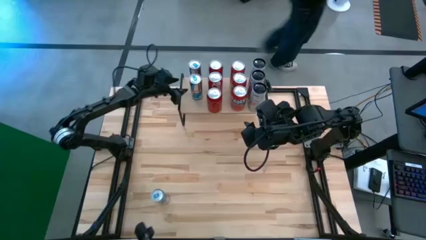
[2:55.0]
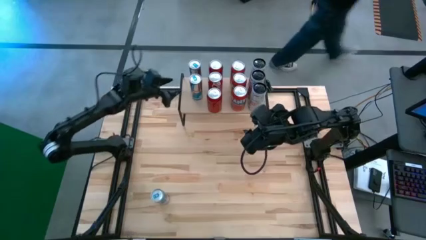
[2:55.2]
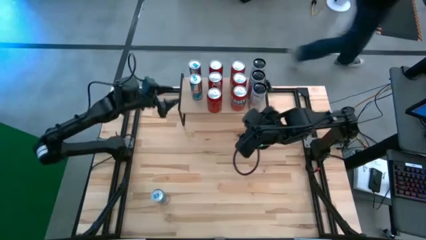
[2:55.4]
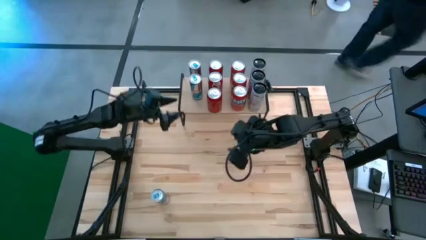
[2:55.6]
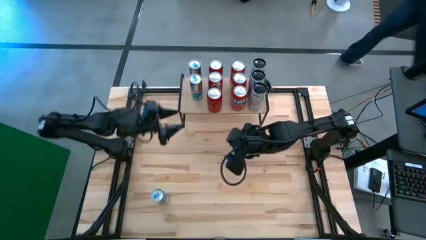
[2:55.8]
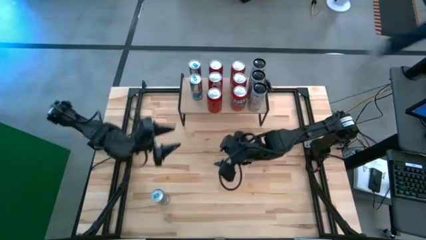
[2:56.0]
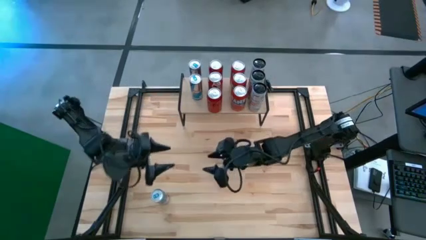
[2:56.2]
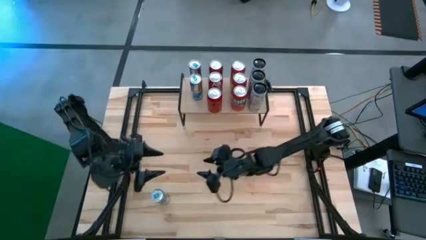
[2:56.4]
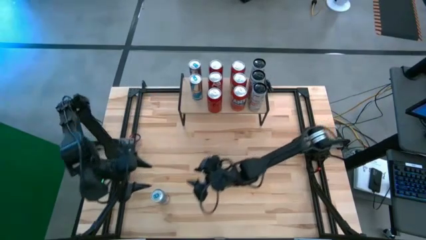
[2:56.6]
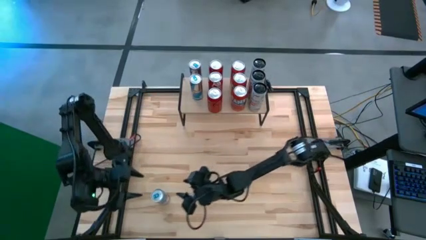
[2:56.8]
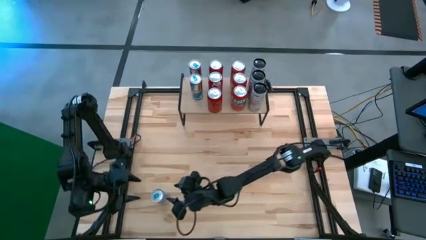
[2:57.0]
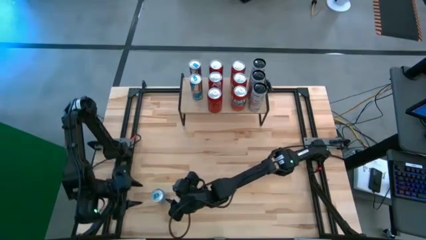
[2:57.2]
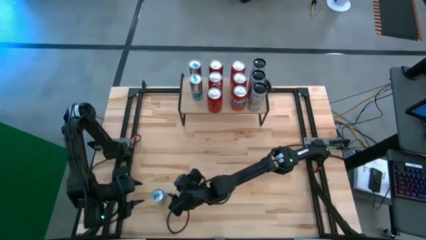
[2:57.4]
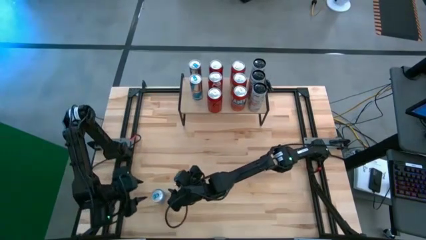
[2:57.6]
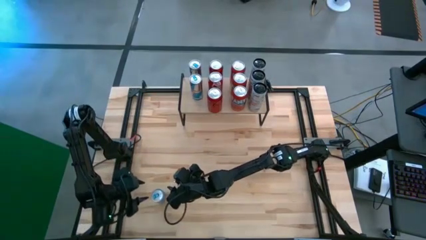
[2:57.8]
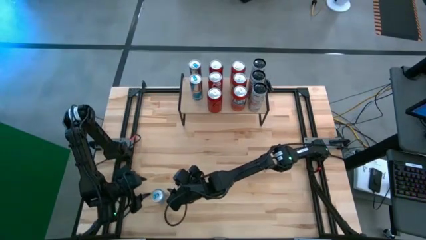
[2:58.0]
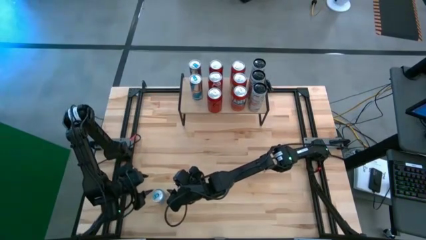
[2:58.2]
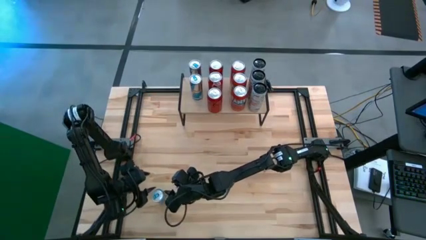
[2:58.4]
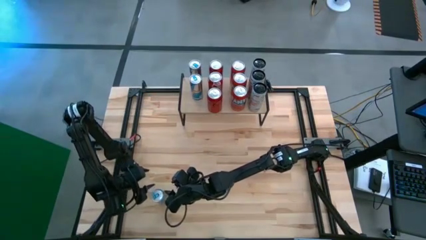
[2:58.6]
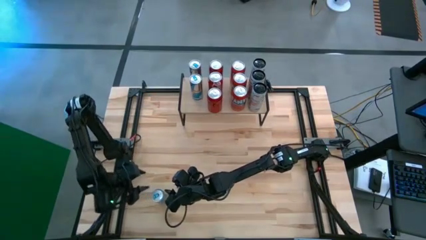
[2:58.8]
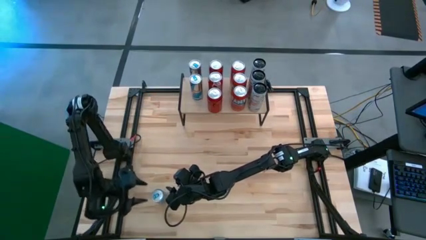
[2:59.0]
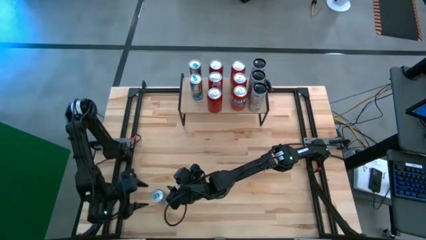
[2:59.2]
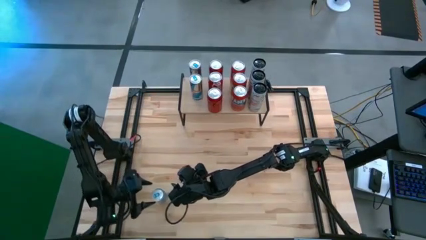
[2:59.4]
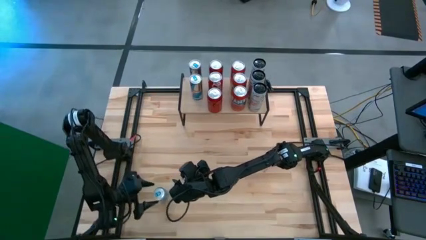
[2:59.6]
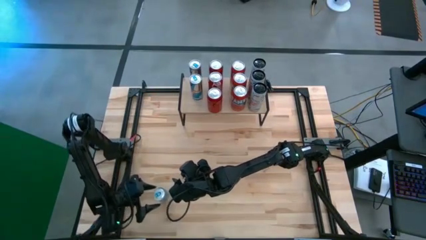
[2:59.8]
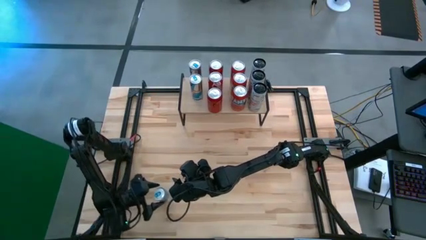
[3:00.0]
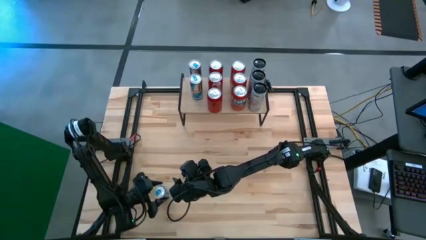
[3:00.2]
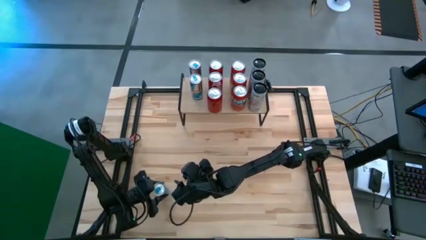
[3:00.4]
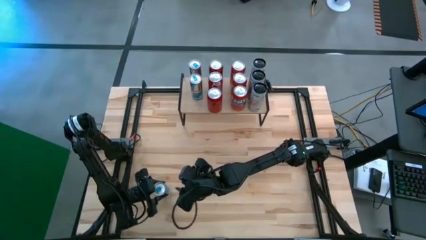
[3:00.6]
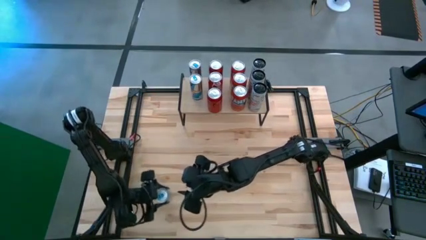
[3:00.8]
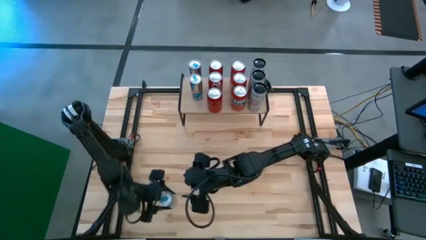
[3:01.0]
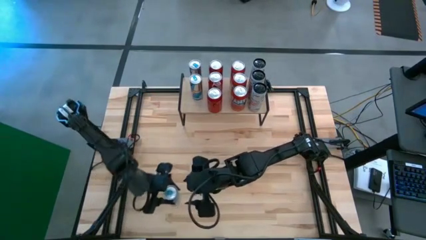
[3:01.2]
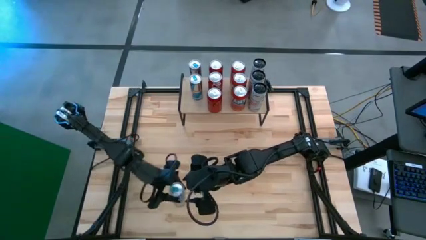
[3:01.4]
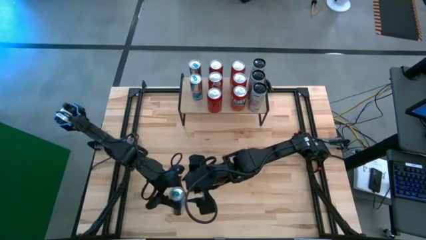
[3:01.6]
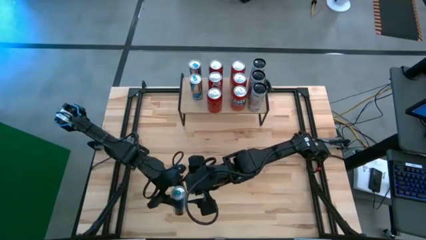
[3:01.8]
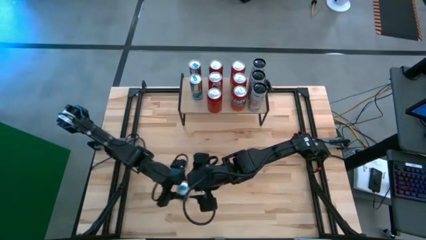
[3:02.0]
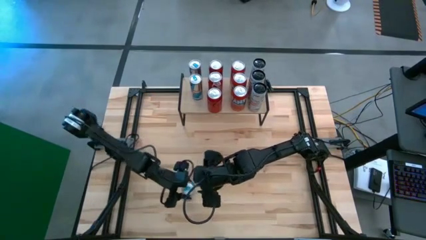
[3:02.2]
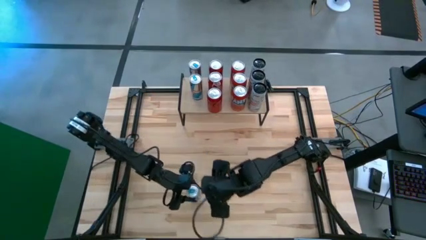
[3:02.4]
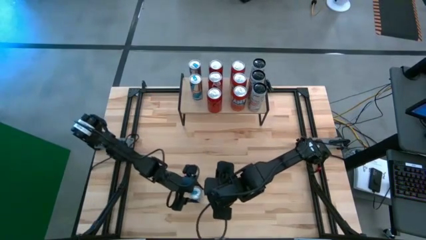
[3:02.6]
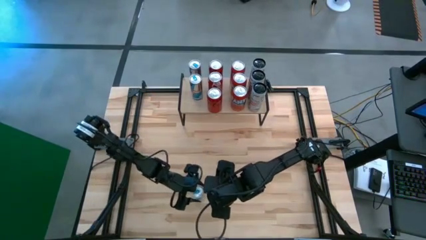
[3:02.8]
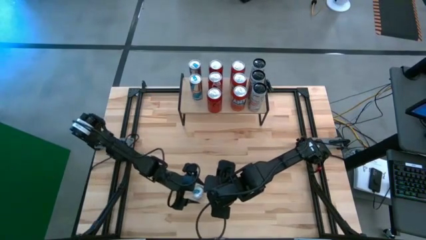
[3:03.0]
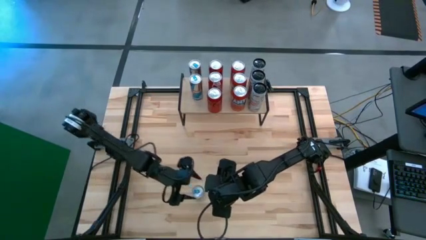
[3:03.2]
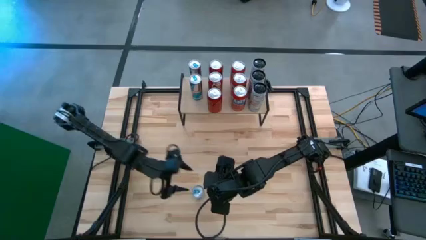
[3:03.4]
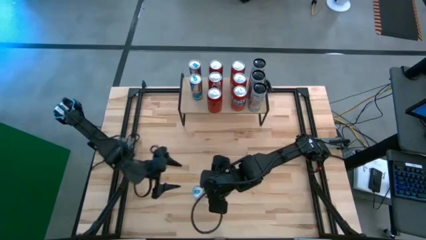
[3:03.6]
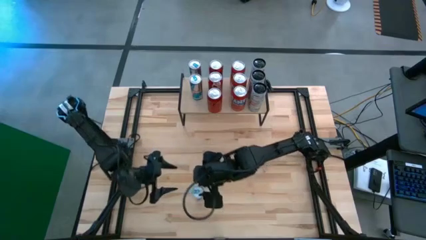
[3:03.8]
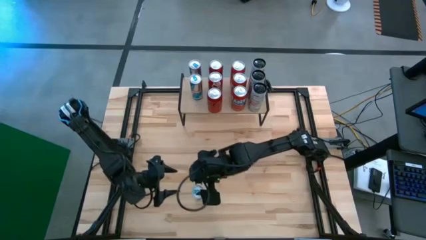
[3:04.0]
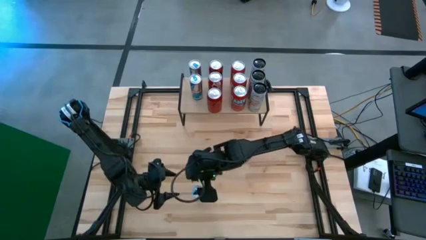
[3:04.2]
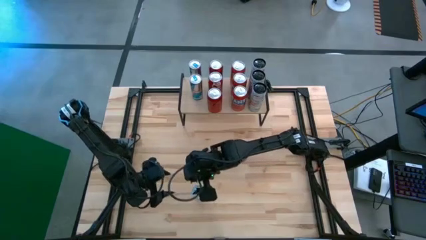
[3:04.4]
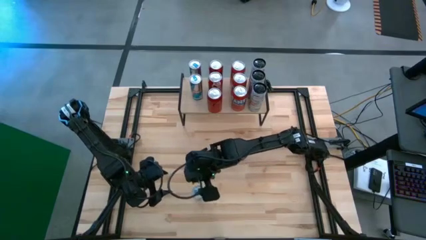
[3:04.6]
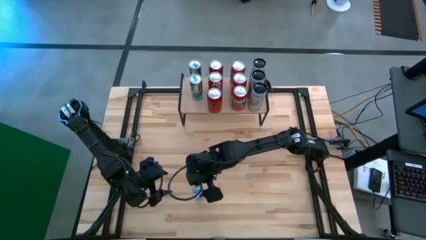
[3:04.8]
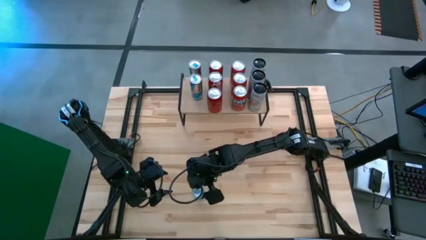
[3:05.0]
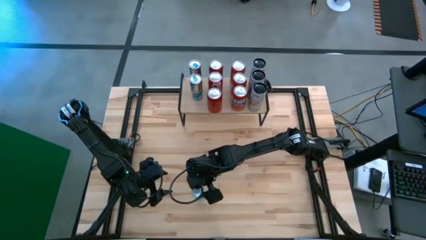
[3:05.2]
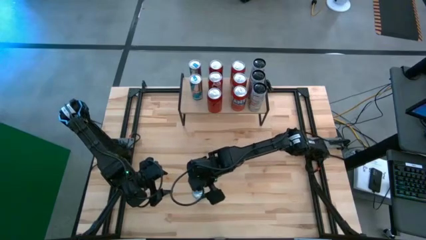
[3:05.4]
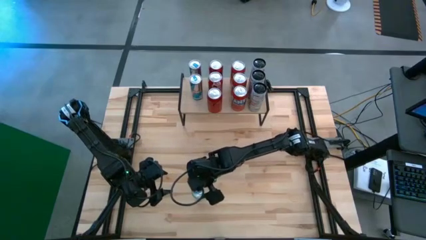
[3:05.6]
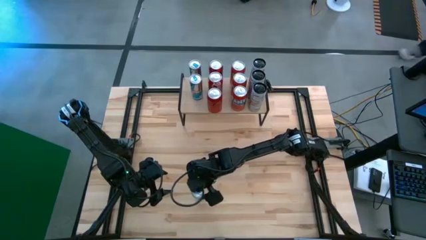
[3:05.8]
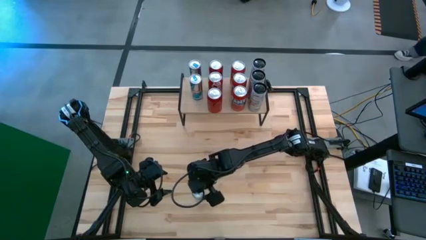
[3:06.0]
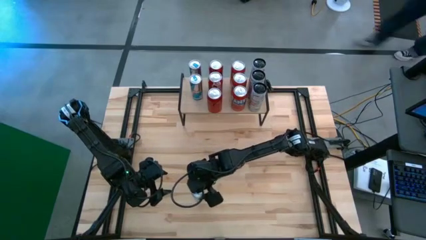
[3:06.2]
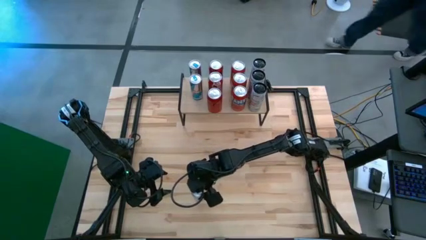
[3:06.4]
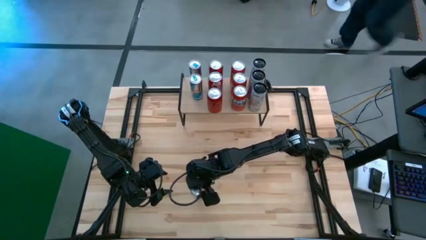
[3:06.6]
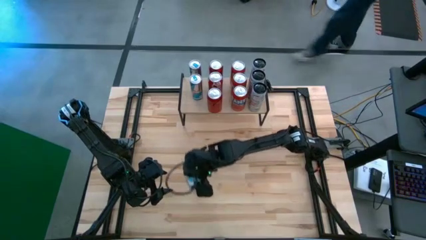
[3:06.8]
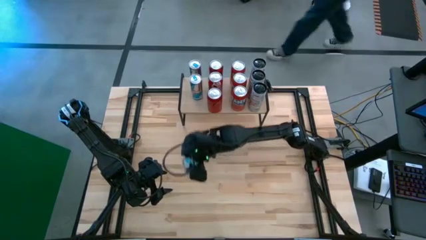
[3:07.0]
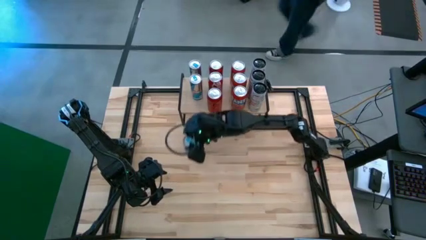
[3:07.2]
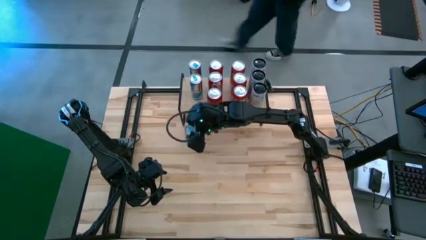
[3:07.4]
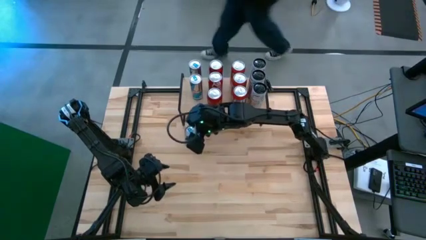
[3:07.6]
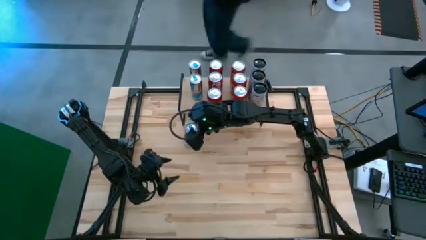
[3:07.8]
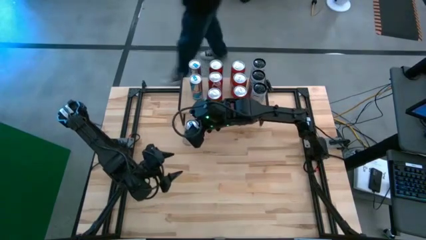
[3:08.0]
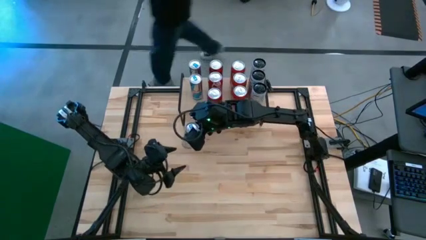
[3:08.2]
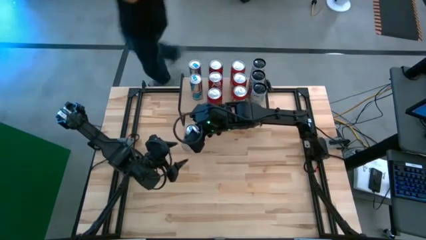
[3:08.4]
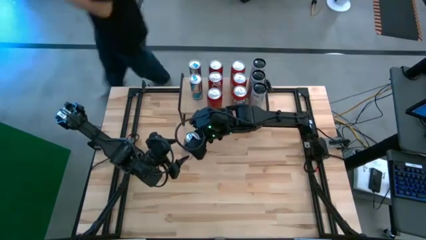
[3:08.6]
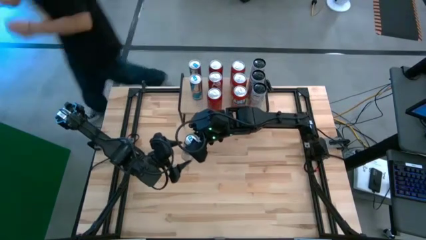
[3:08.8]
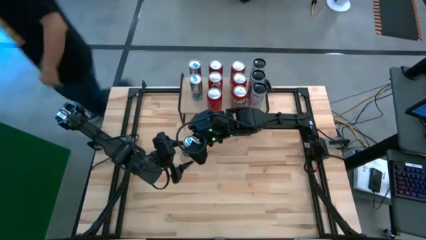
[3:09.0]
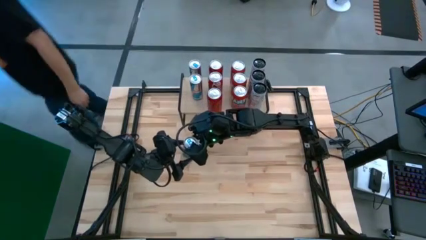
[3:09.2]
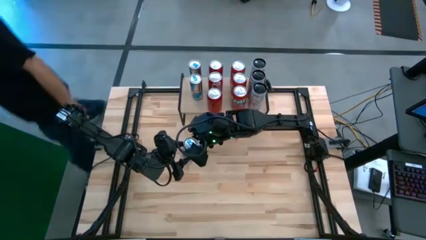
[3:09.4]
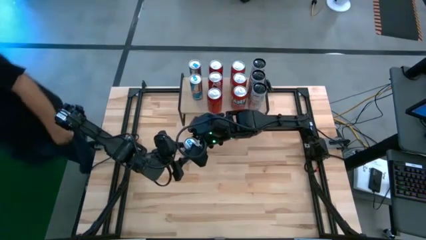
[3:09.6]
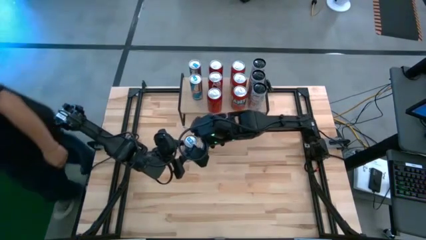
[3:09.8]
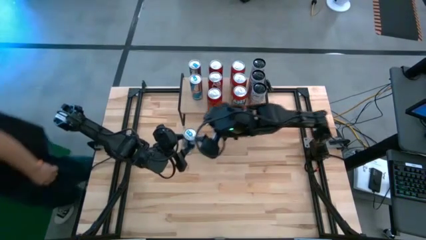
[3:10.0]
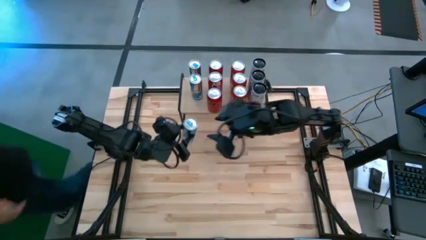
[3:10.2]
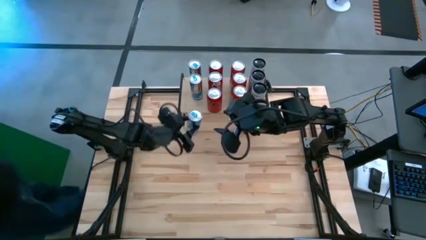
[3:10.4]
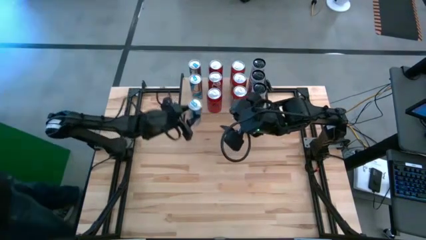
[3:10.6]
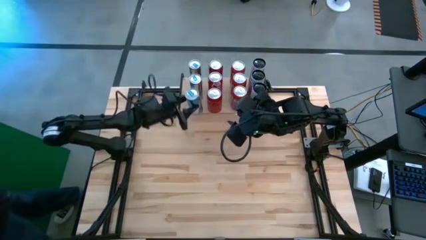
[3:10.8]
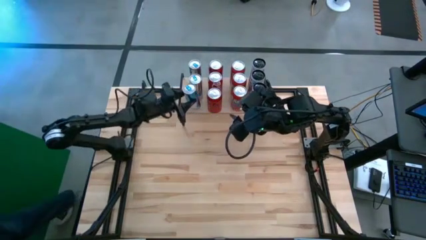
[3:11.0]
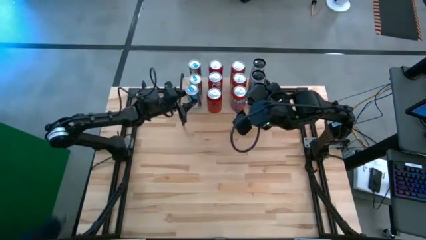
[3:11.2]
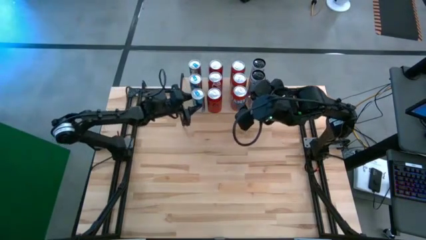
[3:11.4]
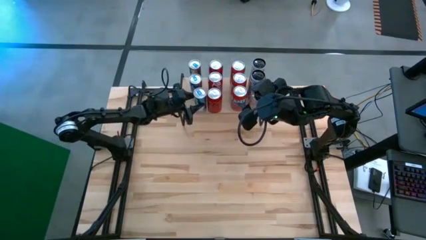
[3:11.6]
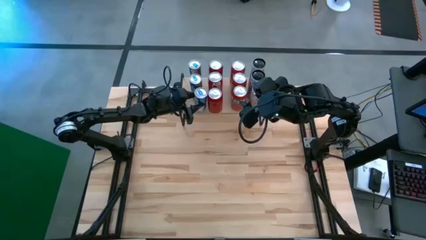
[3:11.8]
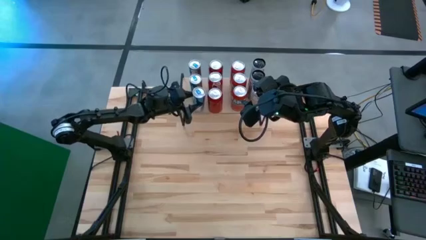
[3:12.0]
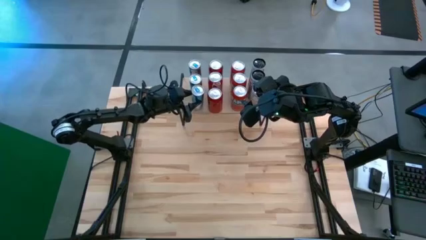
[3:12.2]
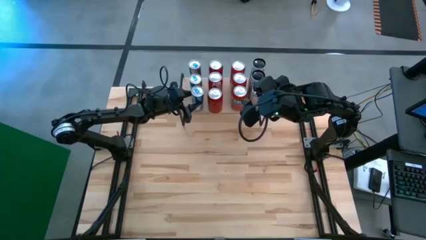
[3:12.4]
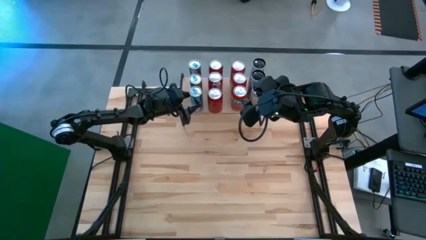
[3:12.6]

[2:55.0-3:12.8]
Task: Place canned beverage on shelf
Put the right blue soda can aligned with the other blue soda cans on the shelf
